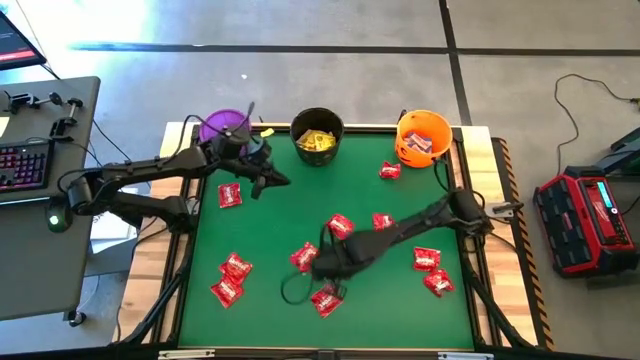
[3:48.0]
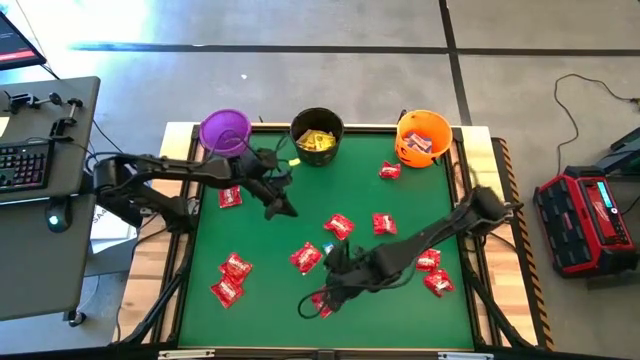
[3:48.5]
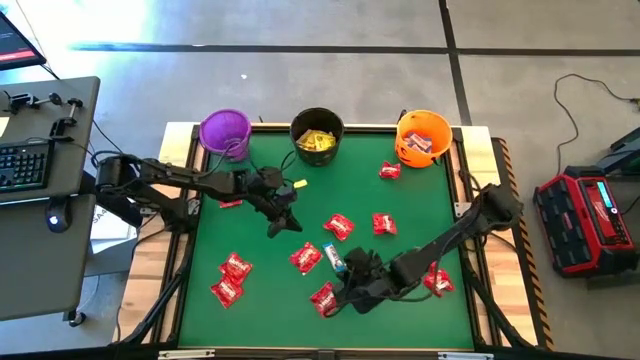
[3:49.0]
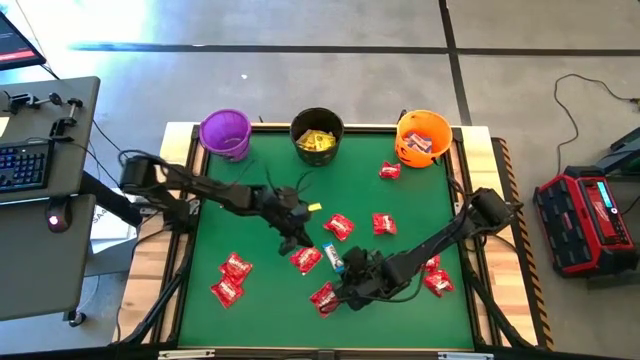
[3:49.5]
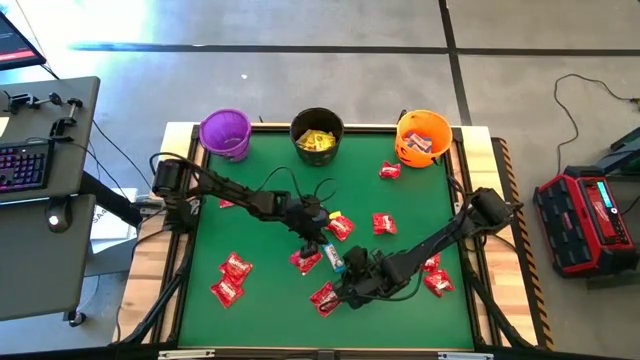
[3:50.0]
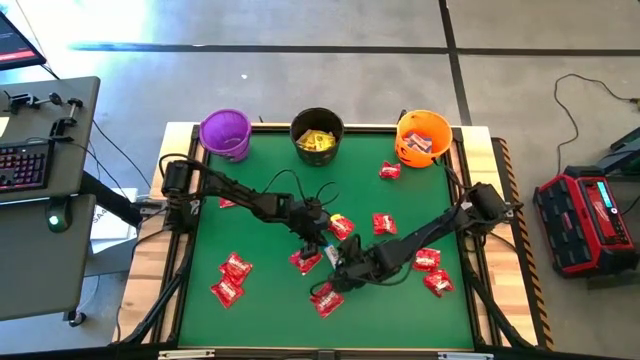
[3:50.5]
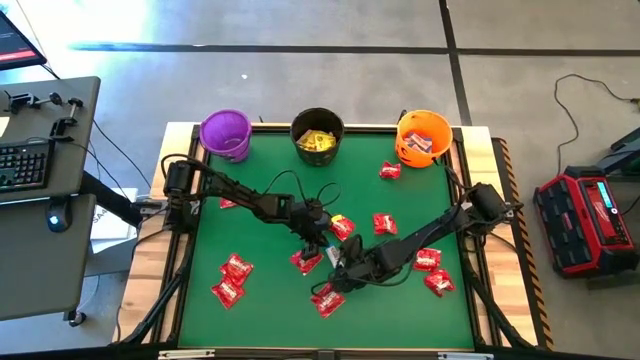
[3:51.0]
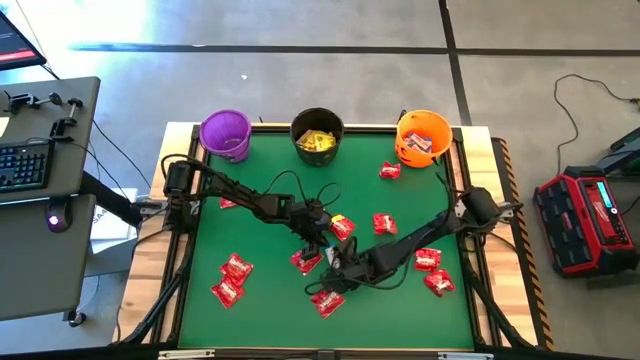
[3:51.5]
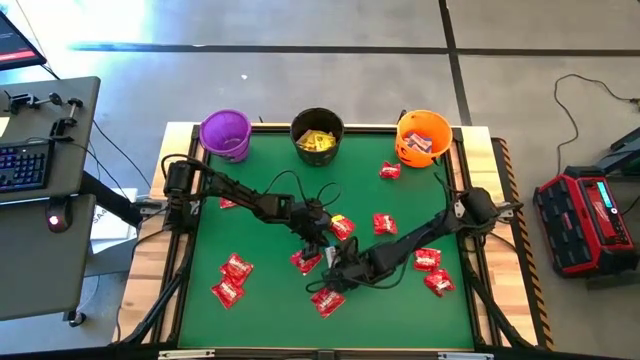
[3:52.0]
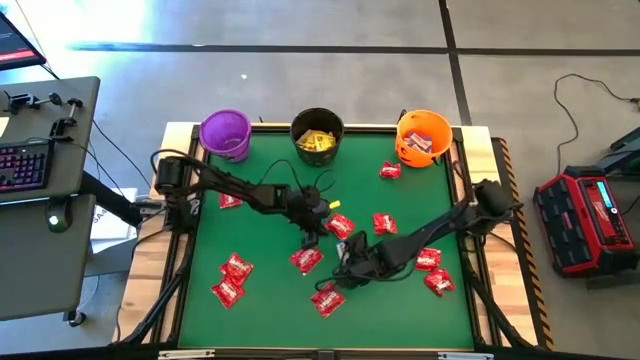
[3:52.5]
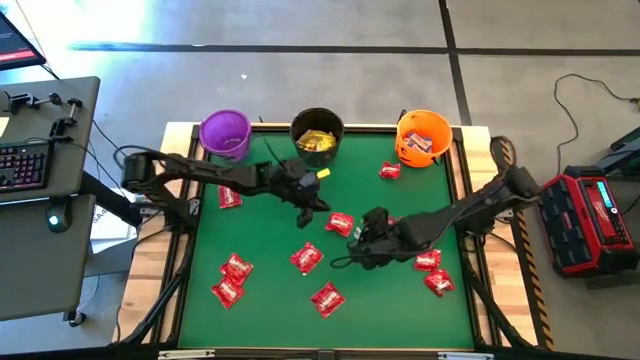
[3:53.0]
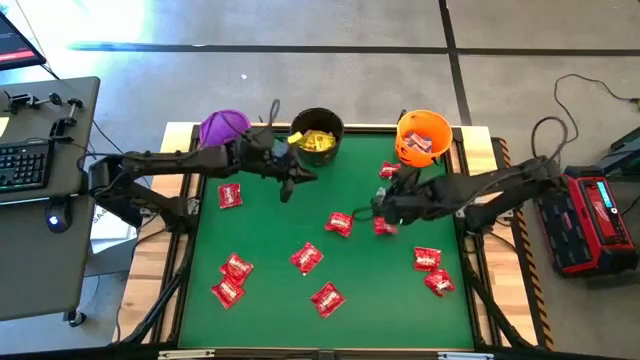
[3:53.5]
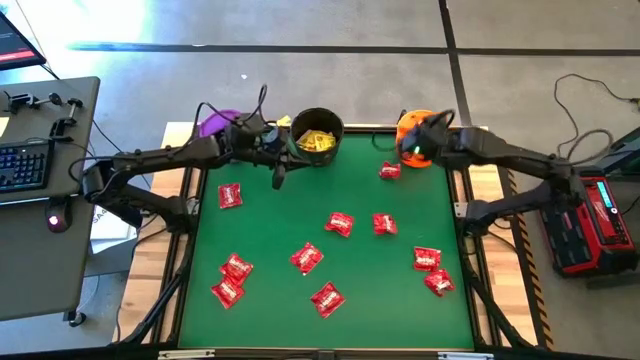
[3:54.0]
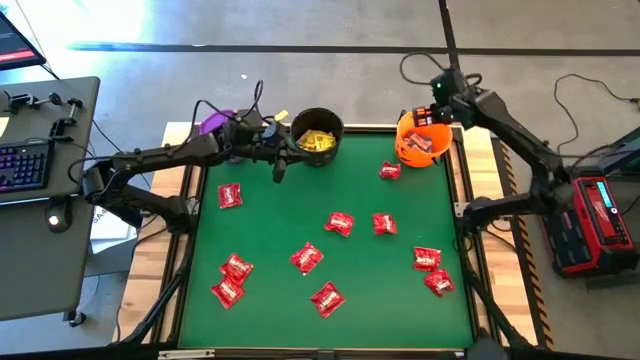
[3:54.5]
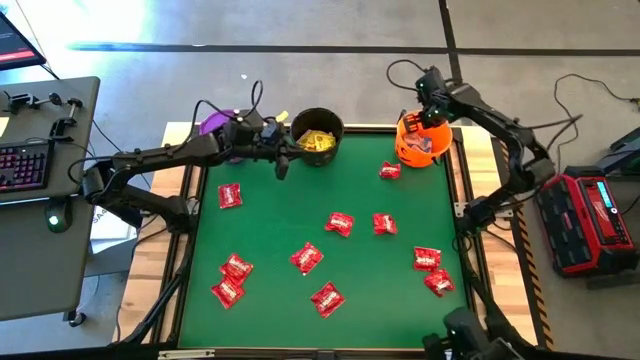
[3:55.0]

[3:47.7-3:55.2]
Task: Sort candy by brand, put in halloween buckets
Put the blue chocolate bar into the orange bucket

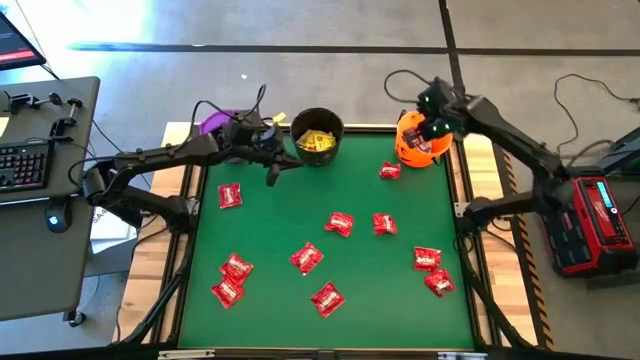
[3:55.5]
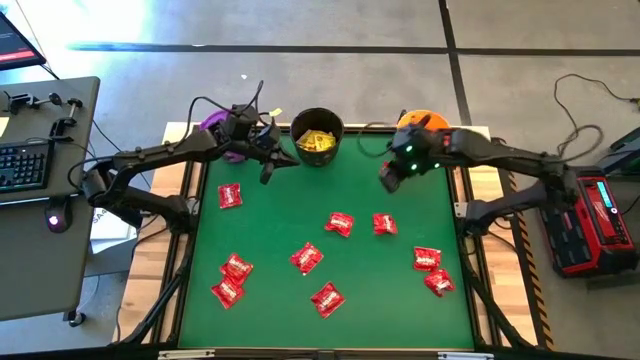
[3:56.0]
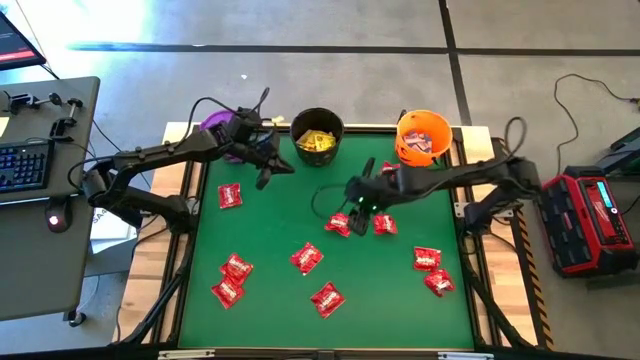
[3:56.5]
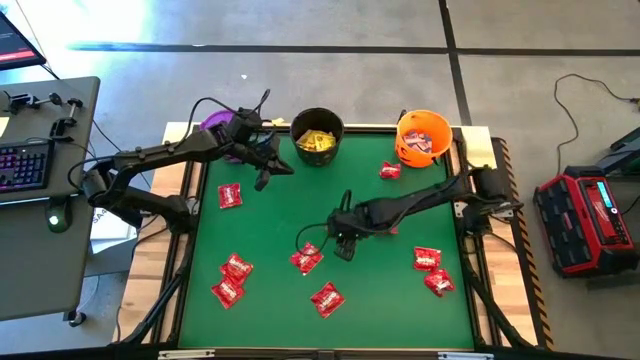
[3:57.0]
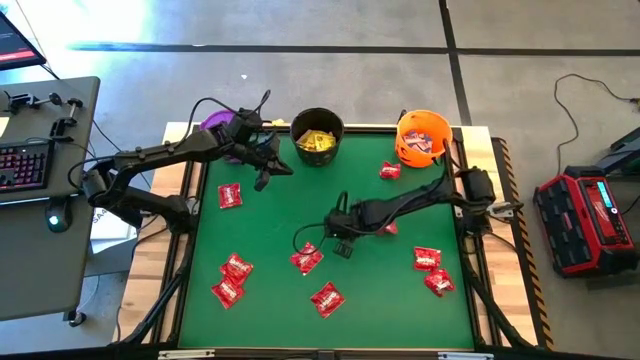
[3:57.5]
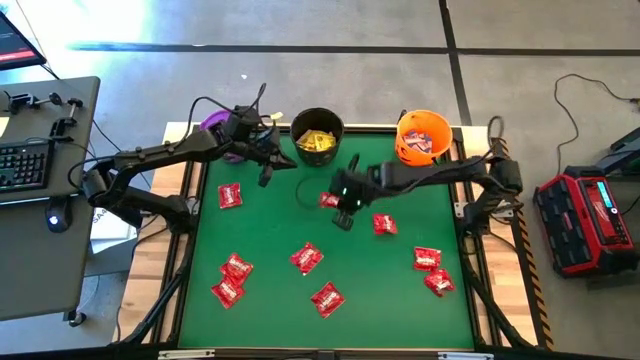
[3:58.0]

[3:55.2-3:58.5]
Put the red candy pack into the violet bucket

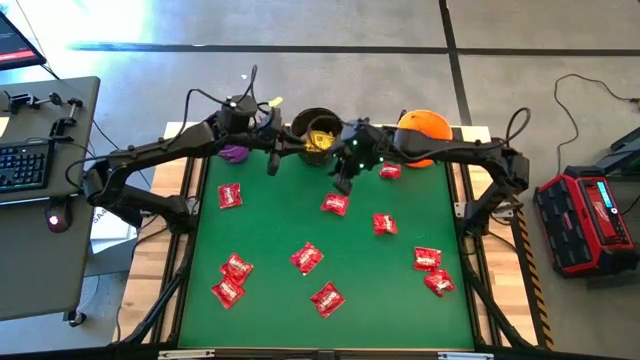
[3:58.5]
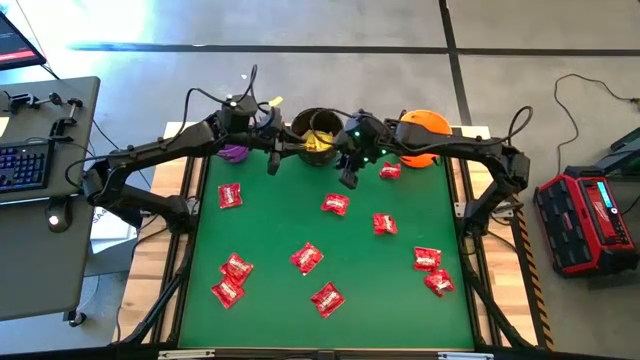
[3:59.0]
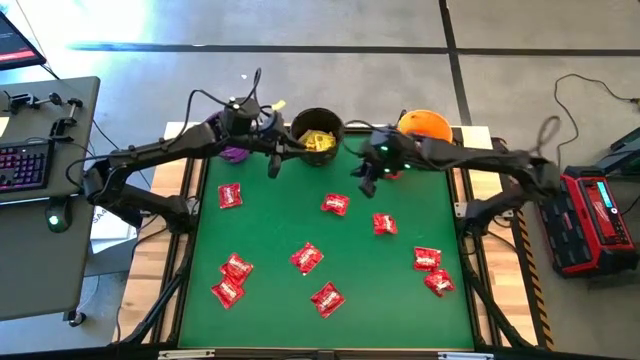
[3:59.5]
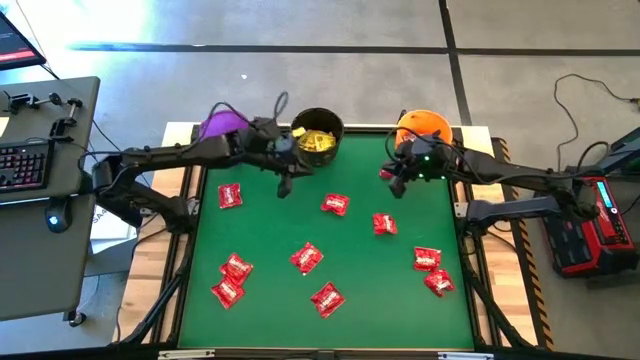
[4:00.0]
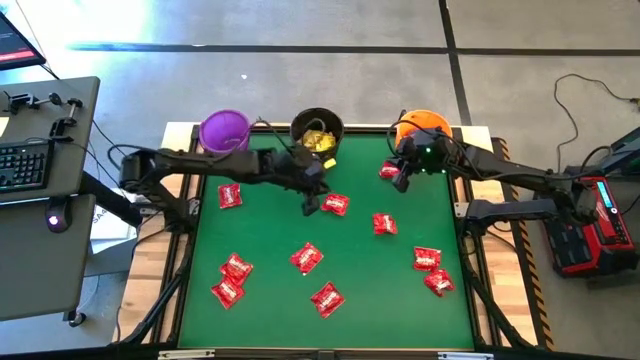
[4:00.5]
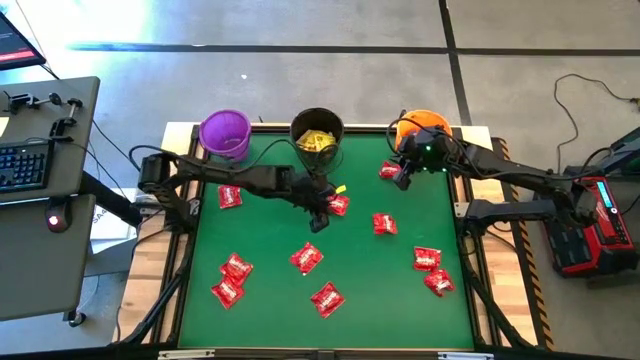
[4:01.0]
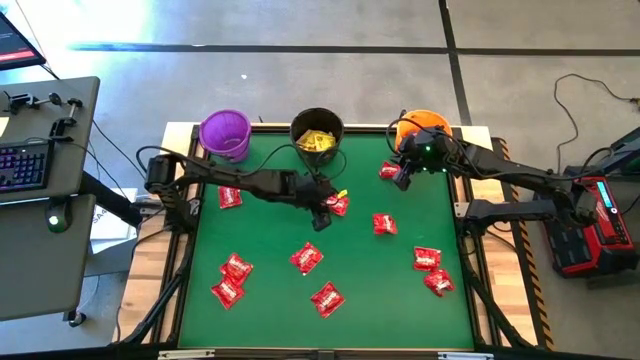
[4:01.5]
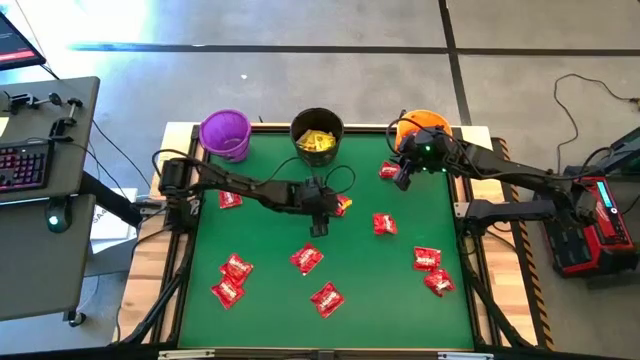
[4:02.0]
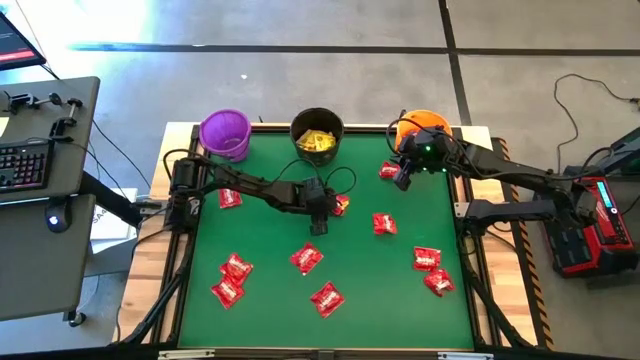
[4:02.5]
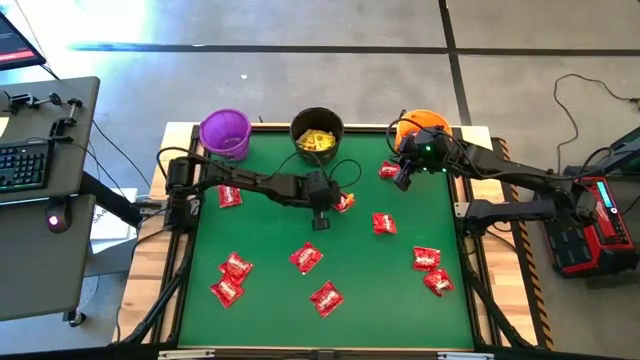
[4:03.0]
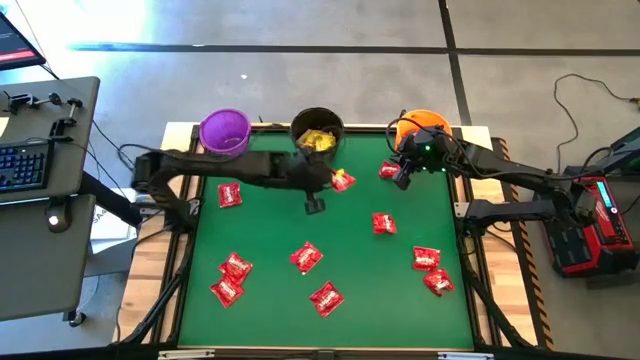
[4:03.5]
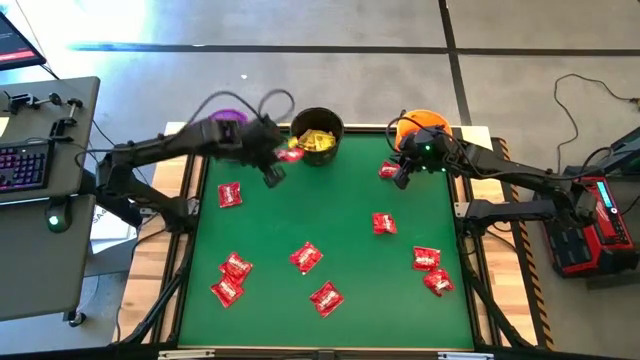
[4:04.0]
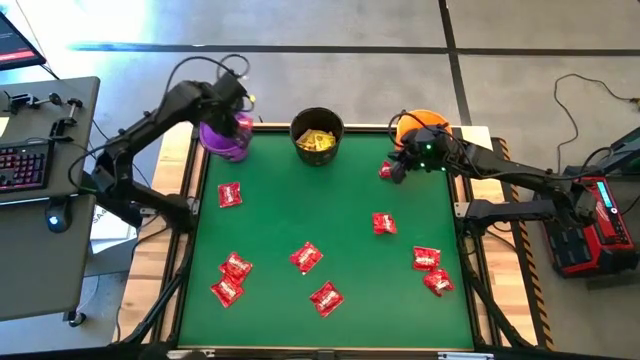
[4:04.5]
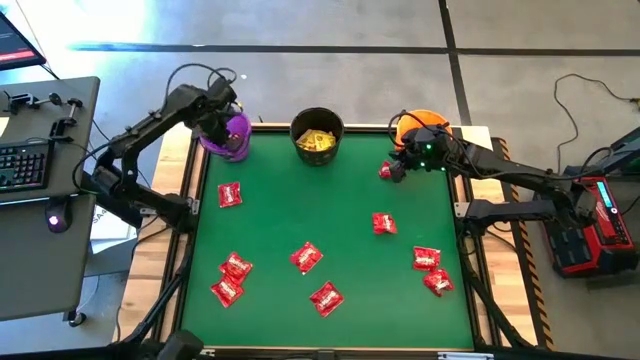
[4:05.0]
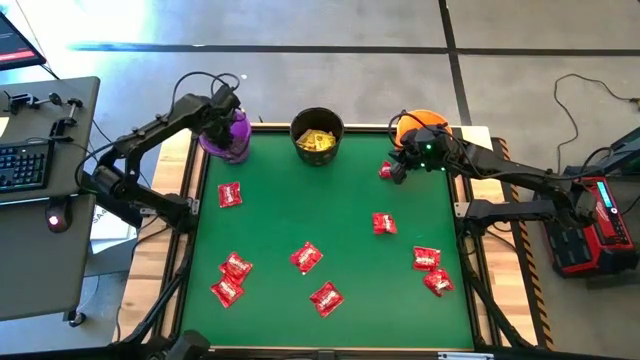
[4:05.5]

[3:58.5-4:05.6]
Put the red candy pack into the violet bucket

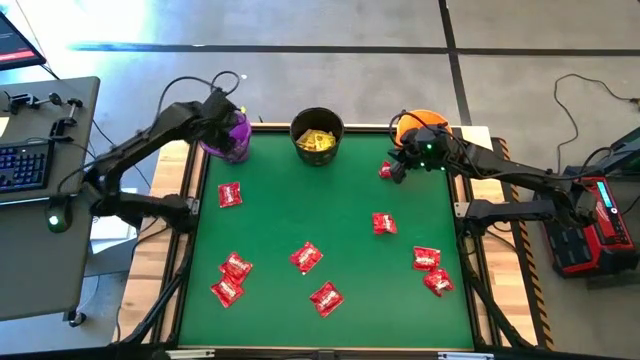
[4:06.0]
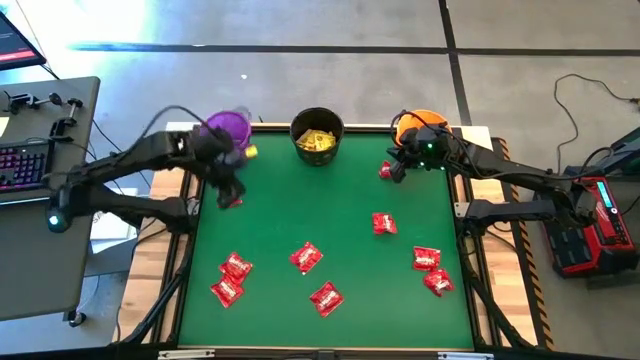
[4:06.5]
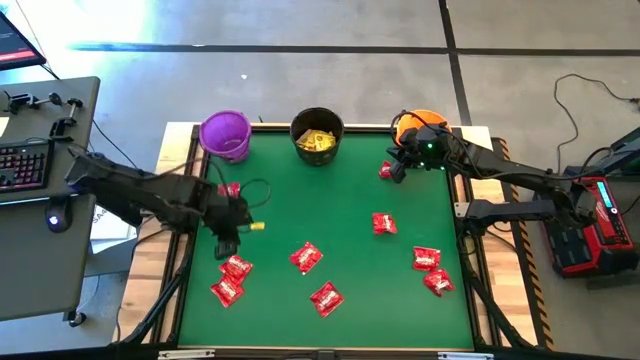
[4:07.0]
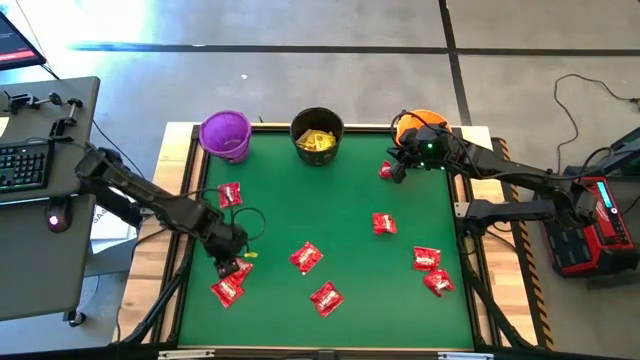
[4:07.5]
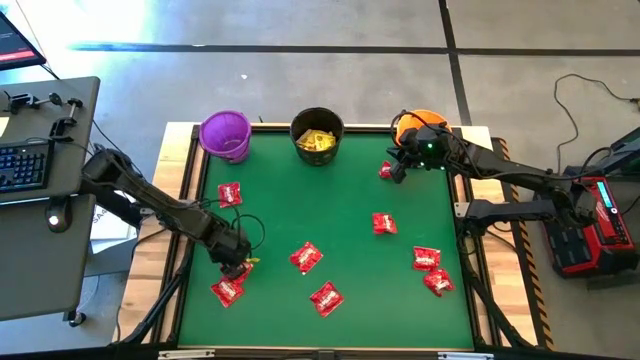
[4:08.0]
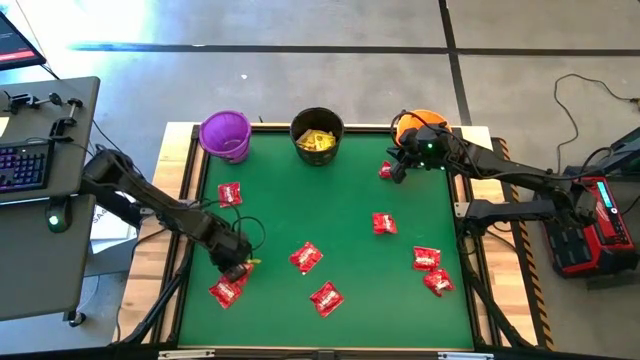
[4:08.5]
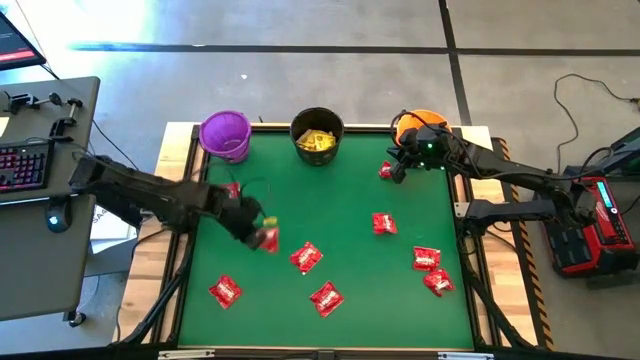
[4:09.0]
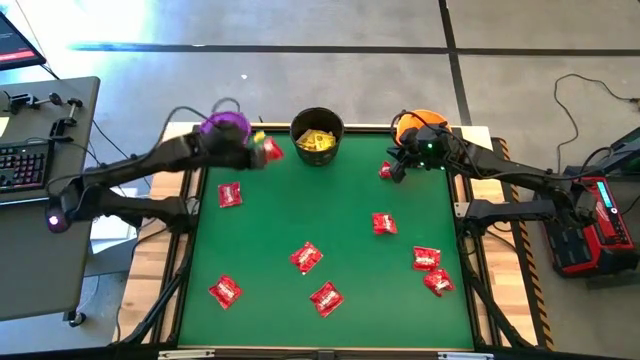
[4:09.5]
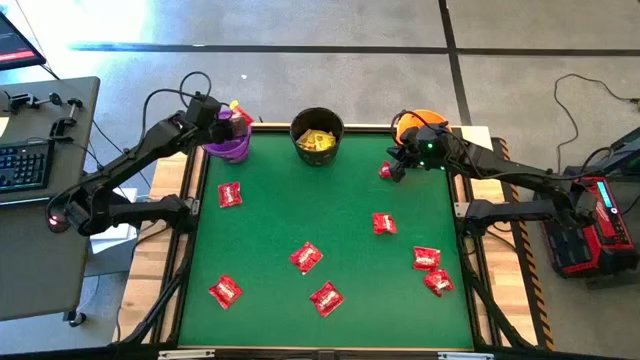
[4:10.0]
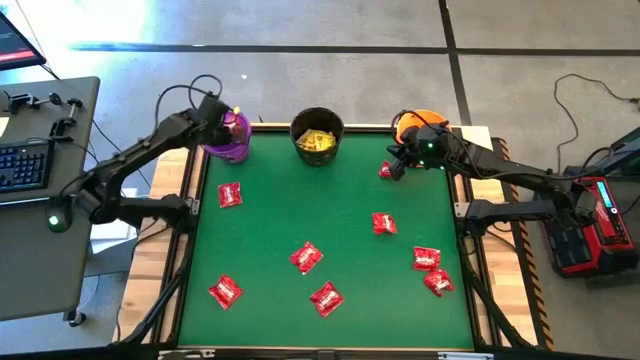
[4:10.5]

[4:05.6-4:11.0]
Put the red candy pack into the violet bucket
